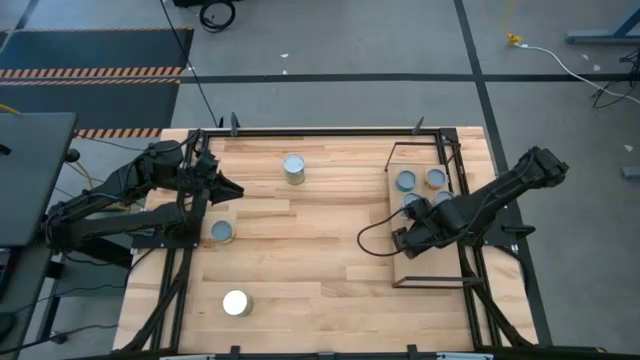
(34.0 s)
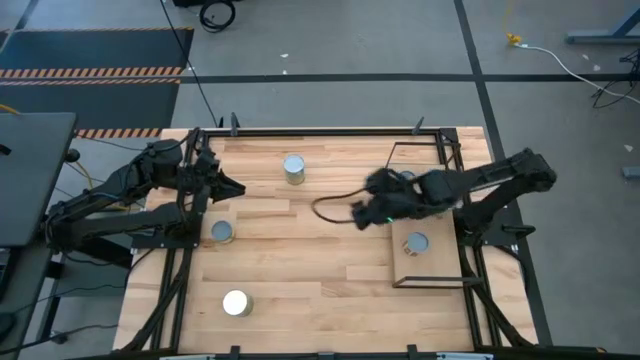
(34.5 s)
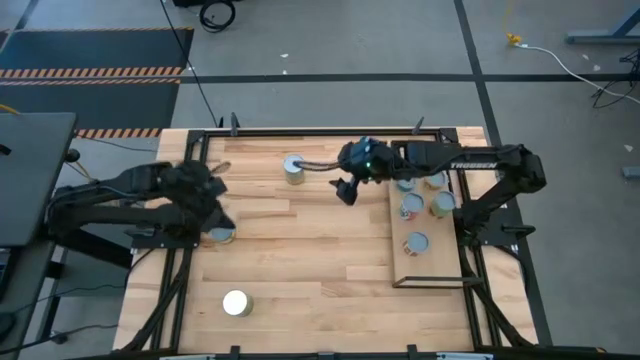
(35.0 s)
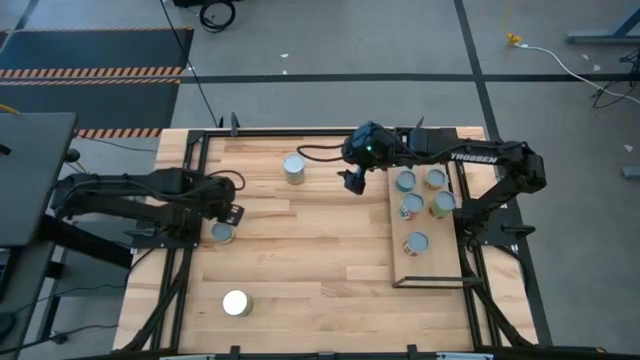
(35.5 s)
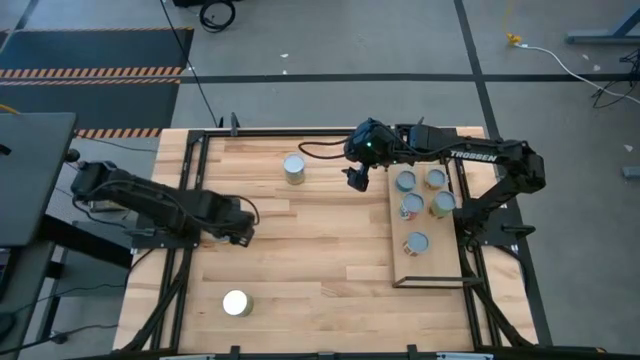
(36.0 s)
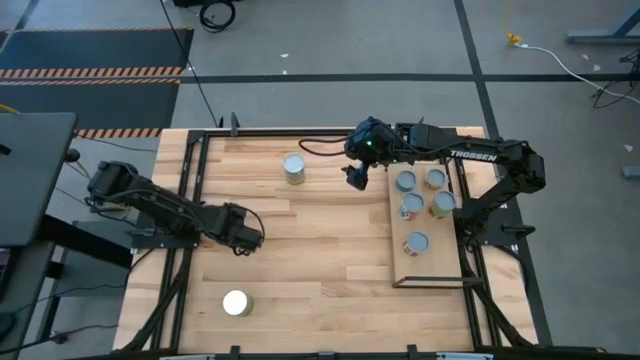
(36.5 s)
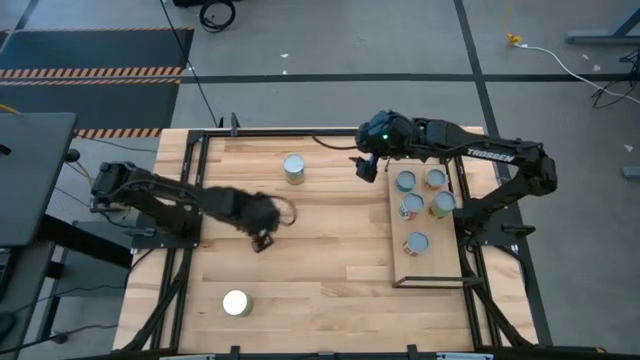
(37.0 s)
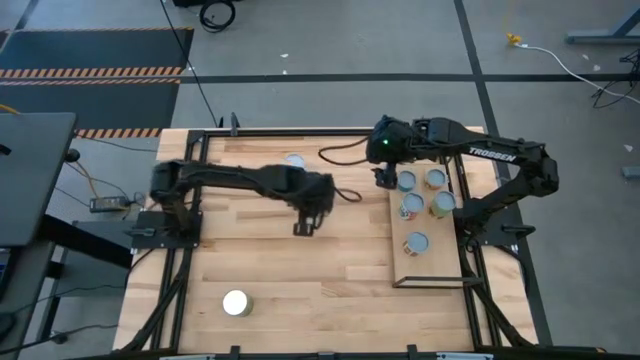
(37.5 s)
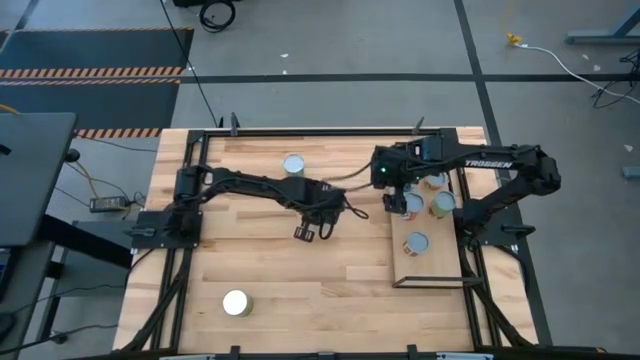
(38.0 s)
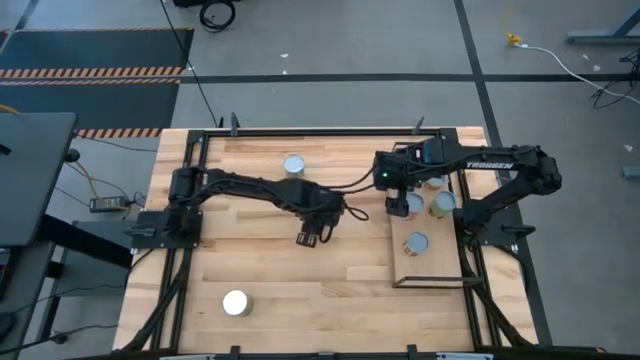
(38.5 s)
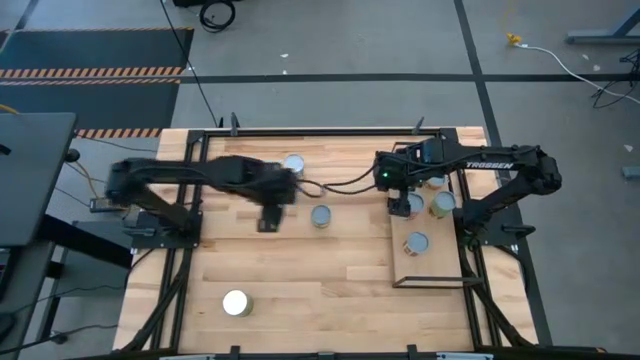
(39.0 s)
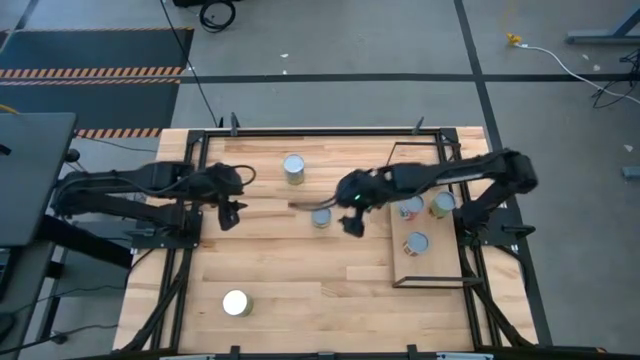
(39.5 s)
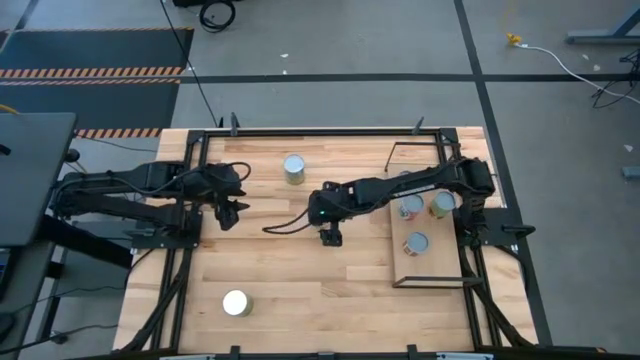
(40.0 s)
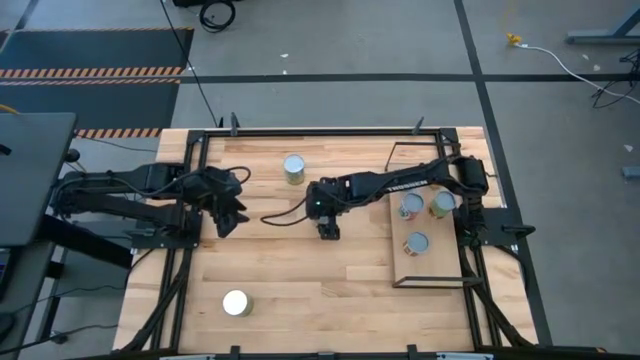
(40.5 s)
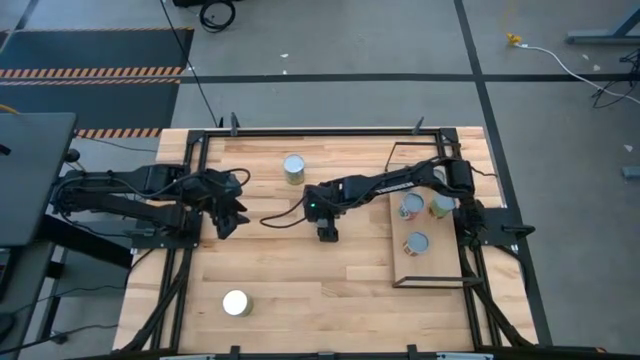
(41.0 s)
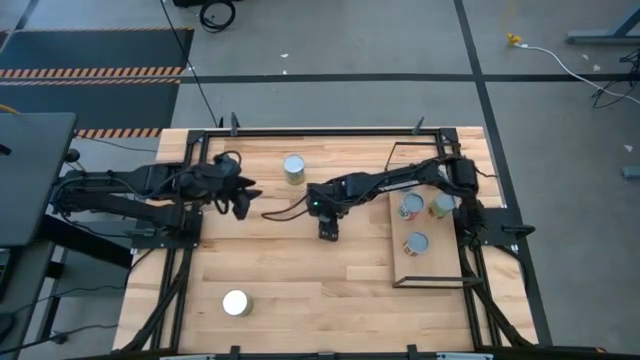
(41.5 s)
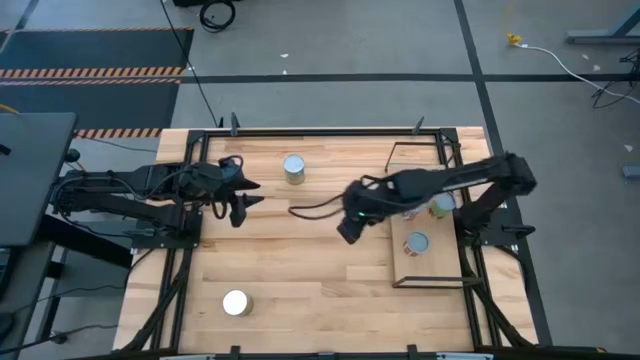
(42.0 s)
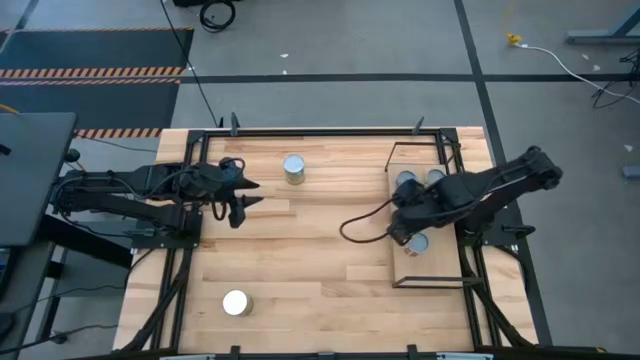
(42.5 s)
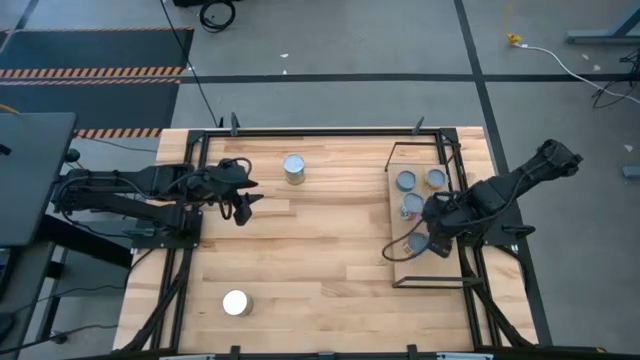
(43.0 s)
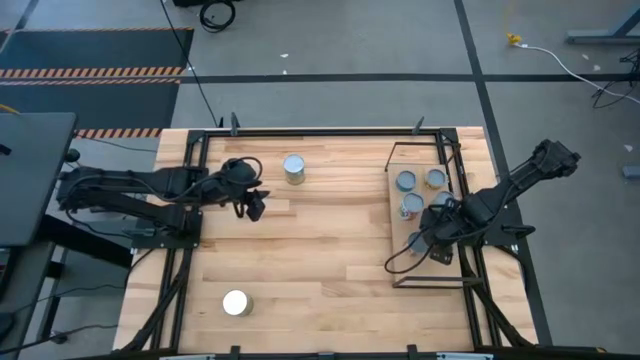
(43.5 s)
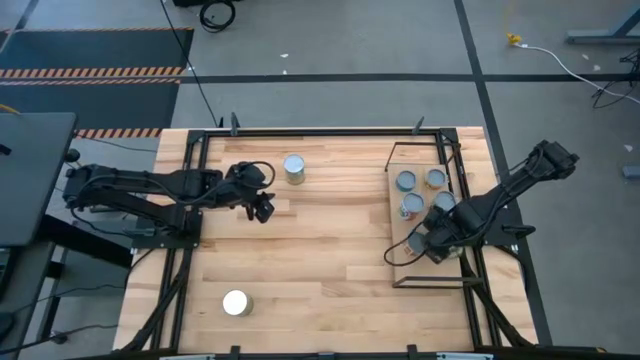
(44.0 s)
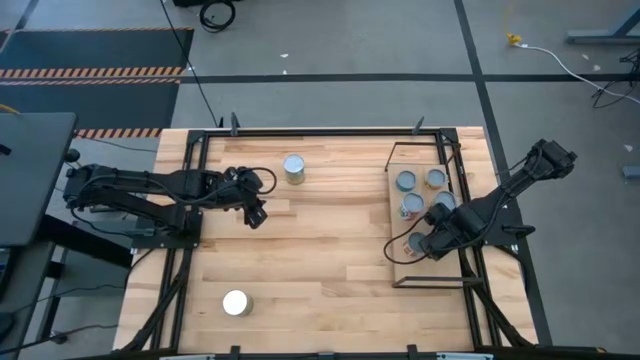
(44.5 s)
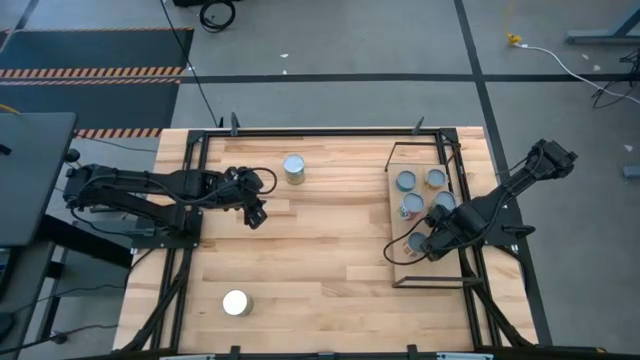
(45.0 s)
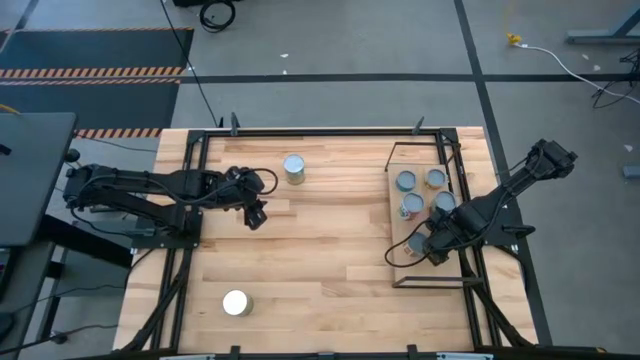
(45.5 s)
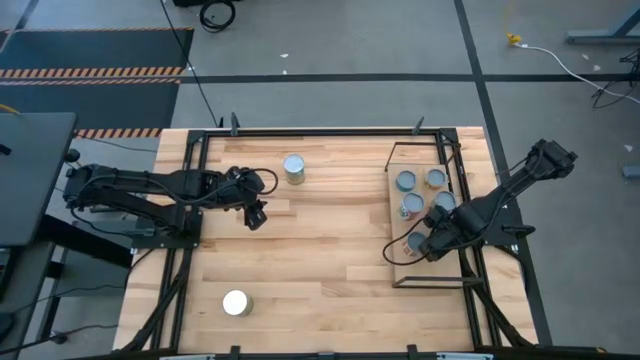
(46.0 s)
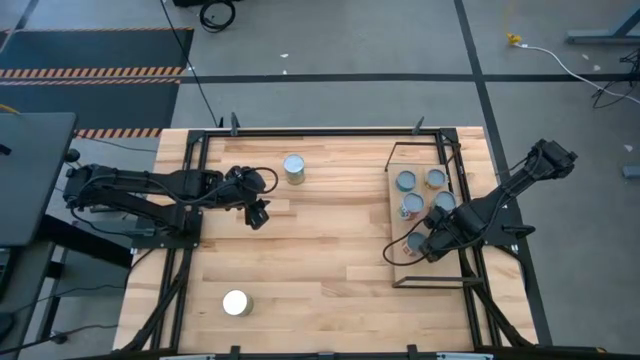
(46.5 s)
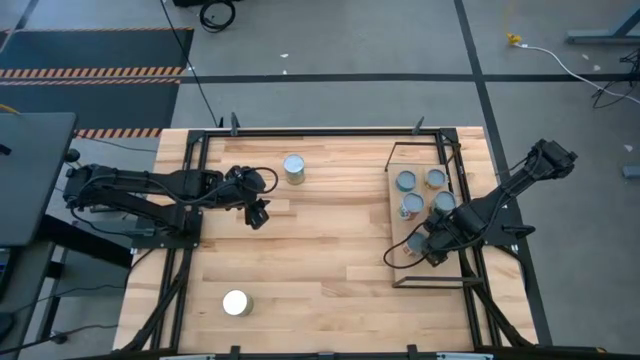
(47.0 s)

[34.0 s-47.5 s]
Task: Pick and place cans onto a shelf
Put the canned peaches on the shelf

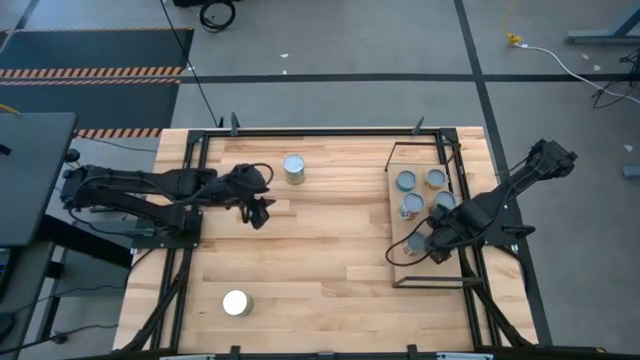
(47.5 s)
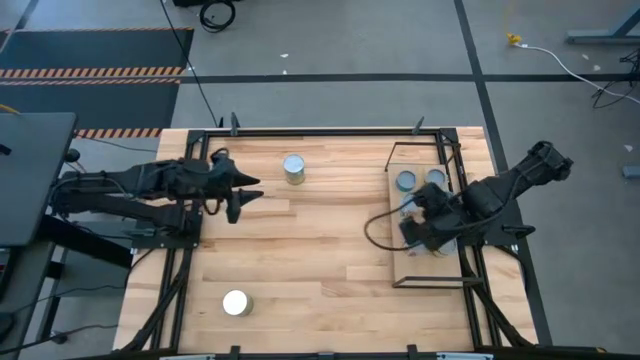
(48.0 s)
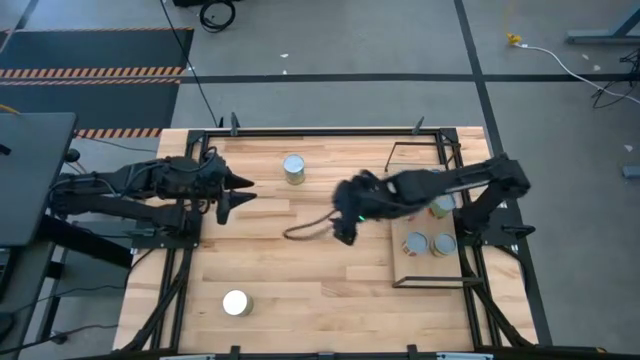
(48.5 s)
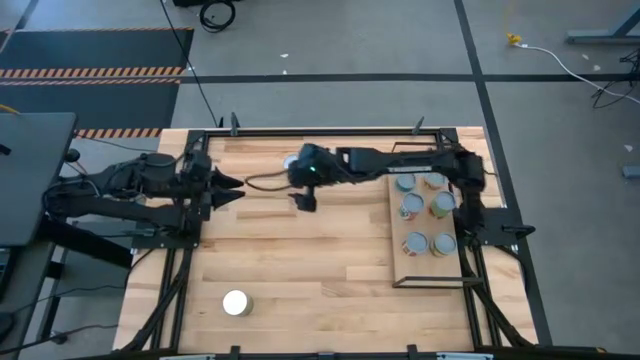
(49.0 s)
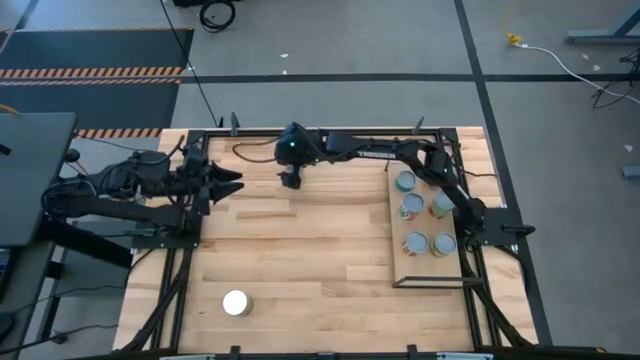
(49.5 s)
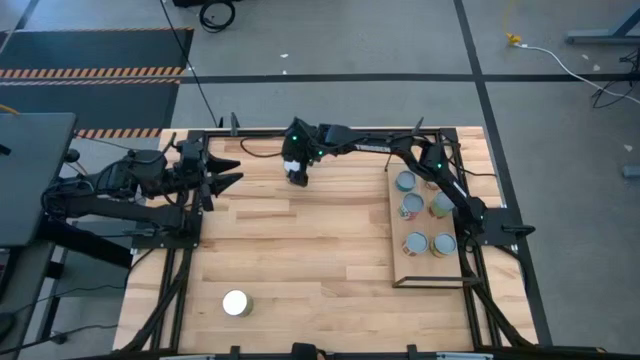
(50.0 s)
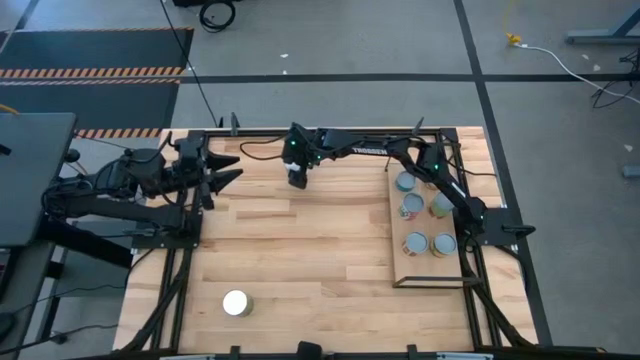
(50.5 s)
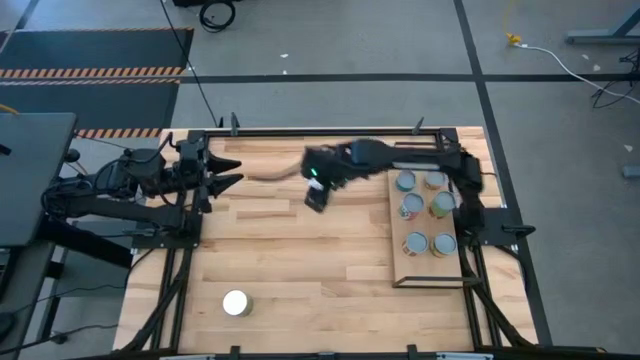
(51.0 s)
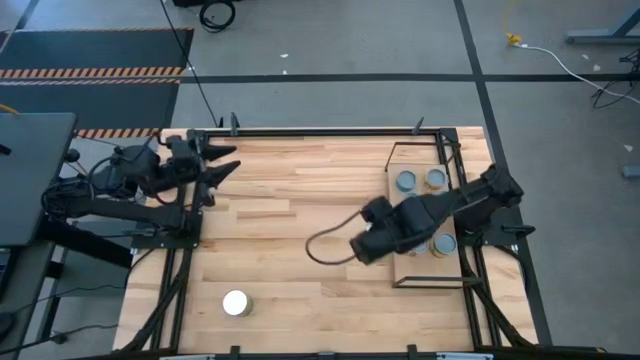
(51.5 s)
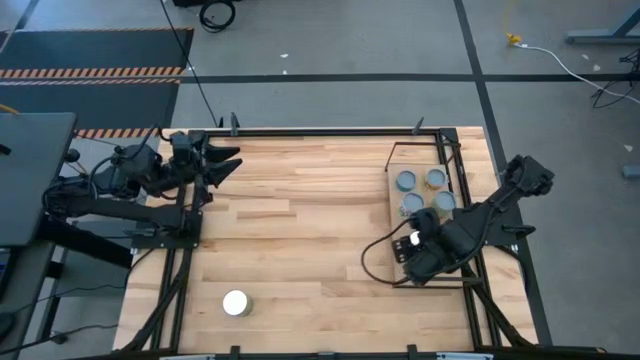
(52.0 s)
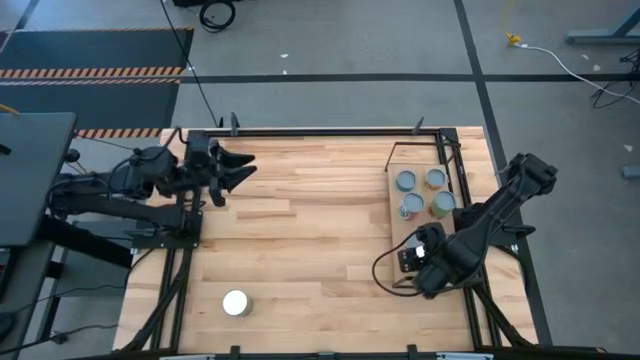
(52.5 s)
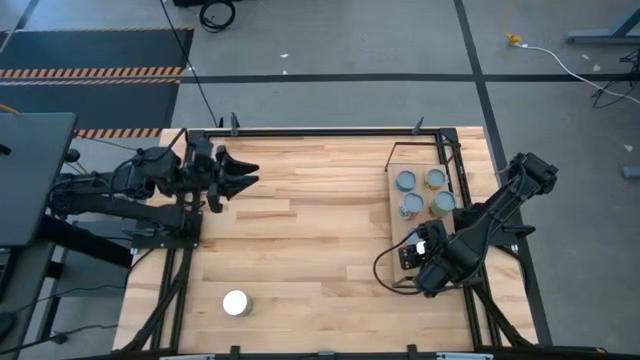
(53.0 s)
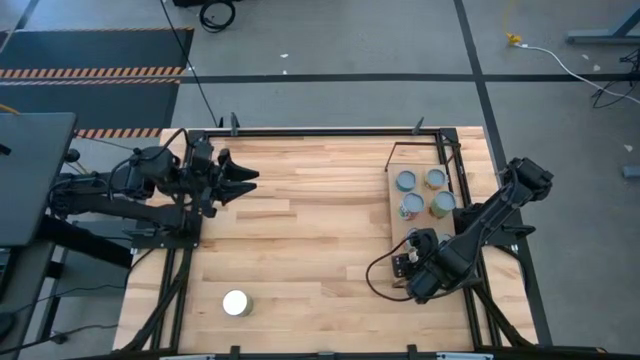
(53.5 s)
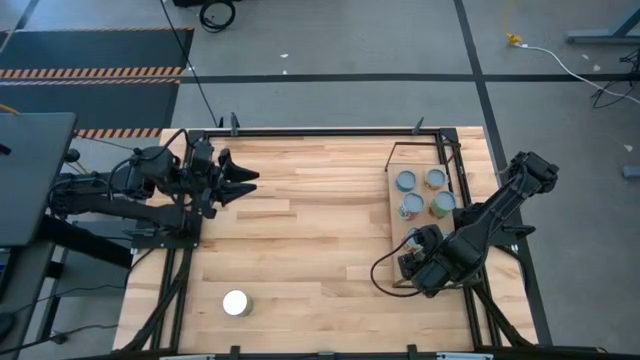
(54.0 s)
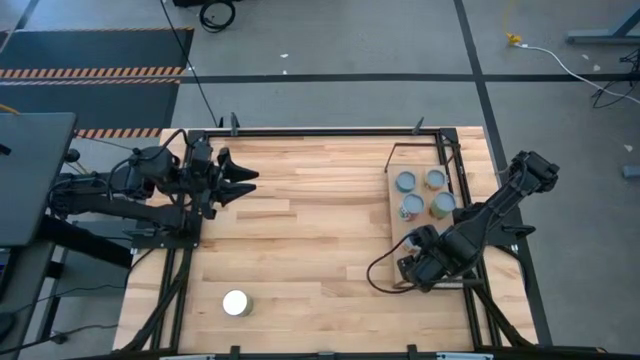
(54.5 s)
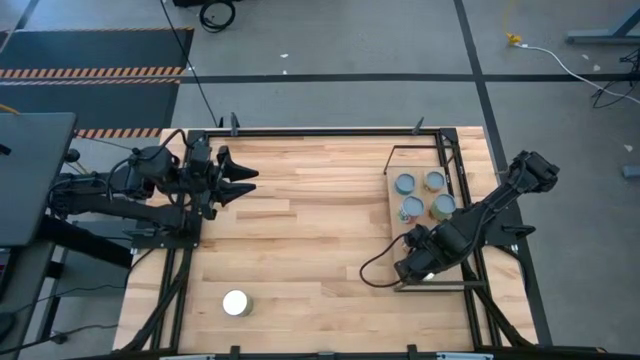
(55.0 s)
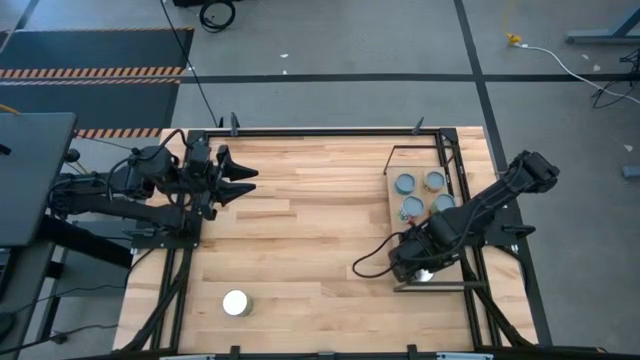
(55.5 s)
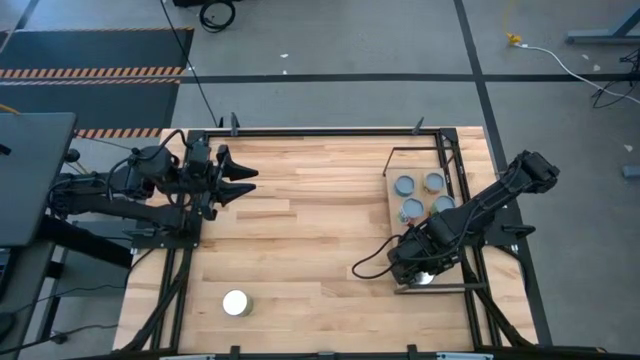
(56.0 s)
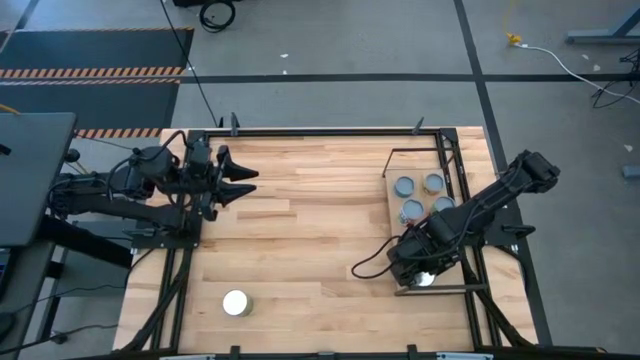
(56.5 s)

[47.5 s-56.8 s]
Put the canned carrots on the shelf
